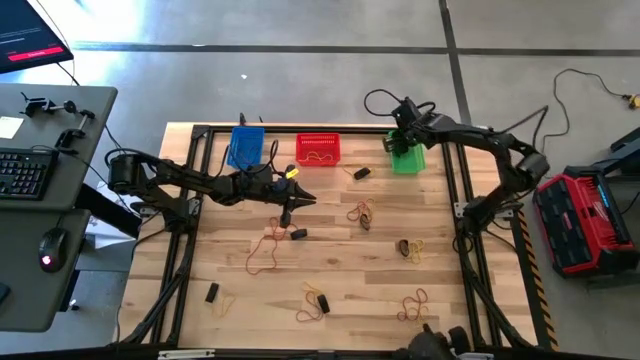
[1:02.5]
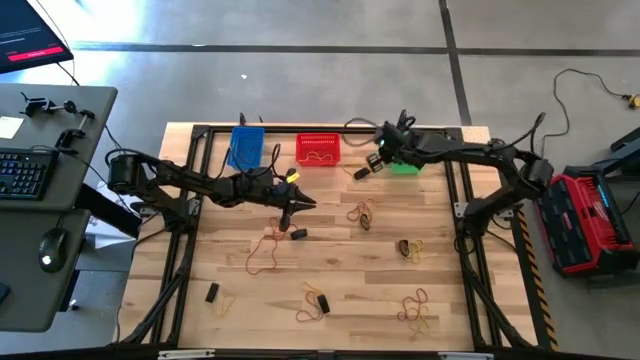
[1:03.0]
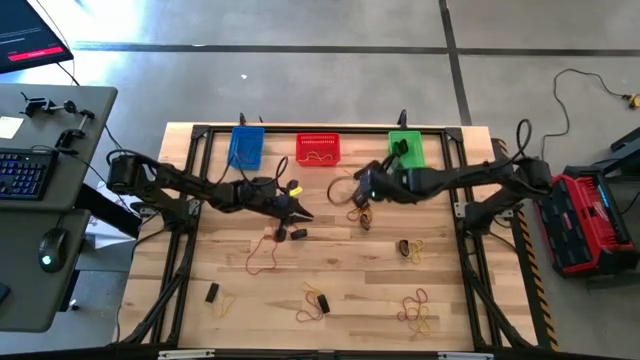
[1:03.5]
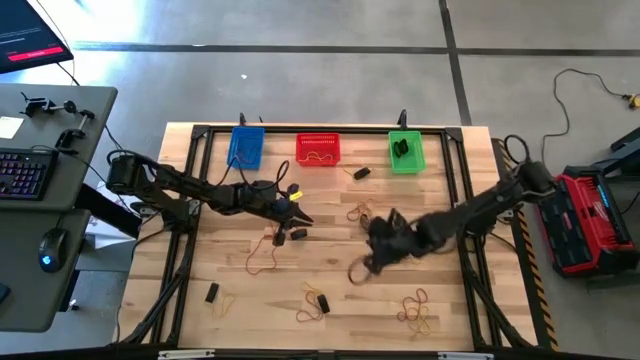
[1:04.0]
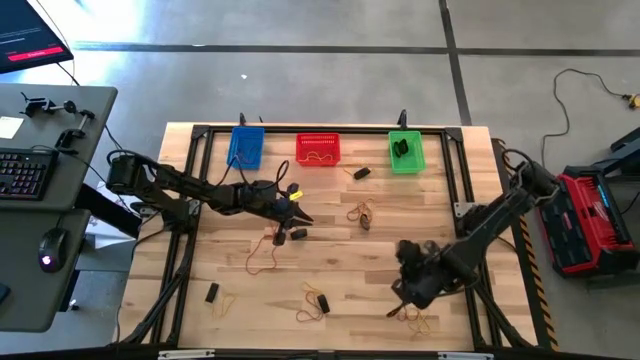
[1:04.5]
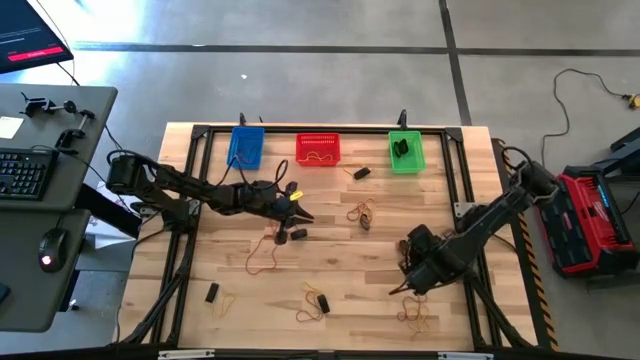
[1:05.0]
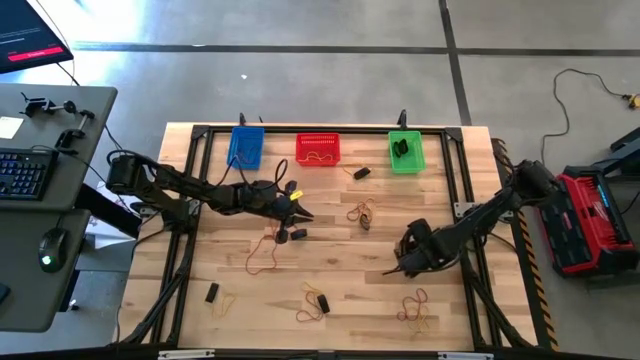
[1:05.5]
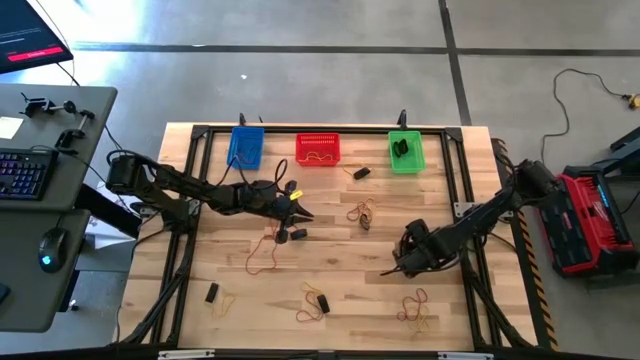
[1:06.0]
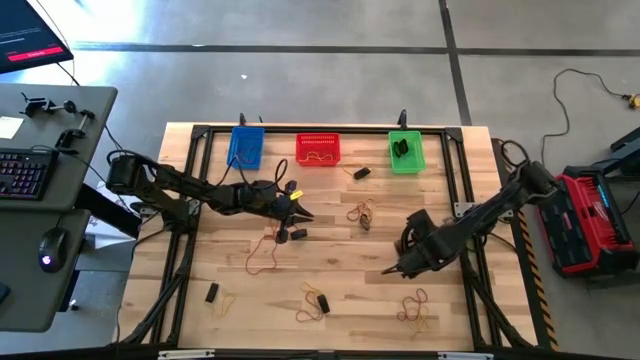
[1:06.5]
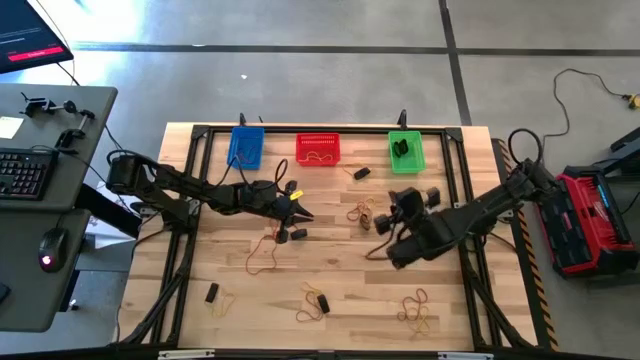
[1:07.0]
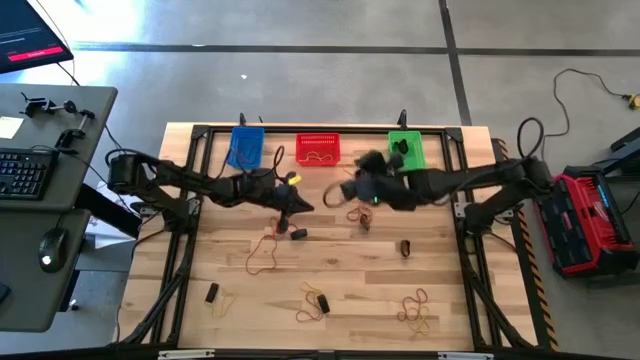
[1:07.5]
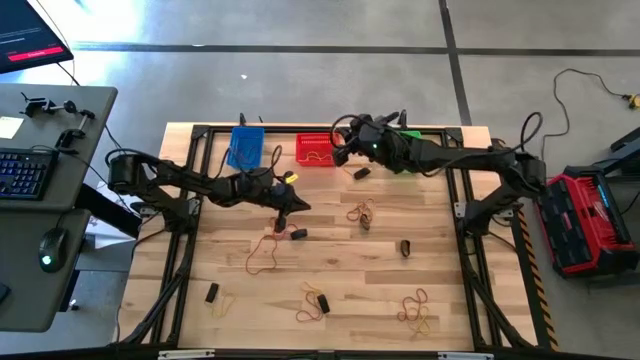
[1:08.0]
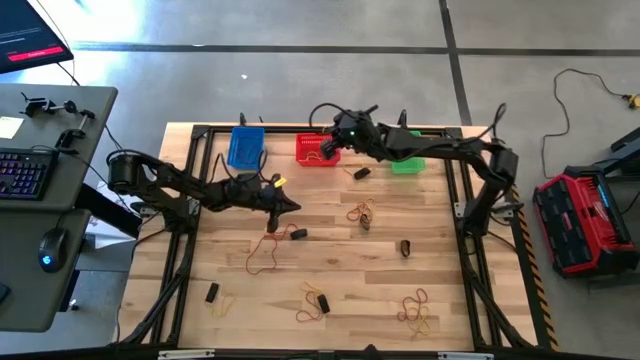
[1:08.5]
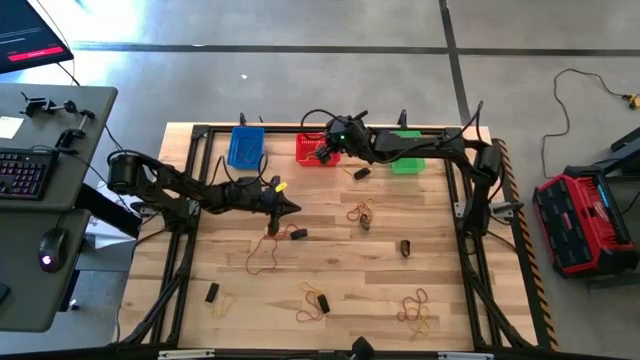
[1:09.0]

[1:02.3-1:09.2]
Task: Sort rubber bands into baskets
Put the yellow rubberband into the orange bin

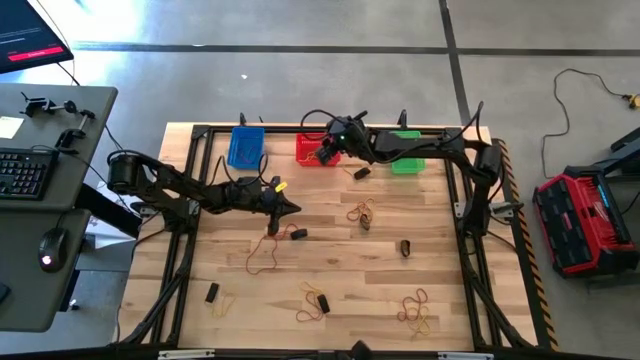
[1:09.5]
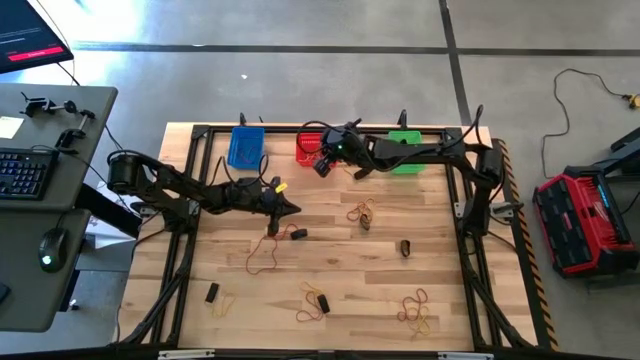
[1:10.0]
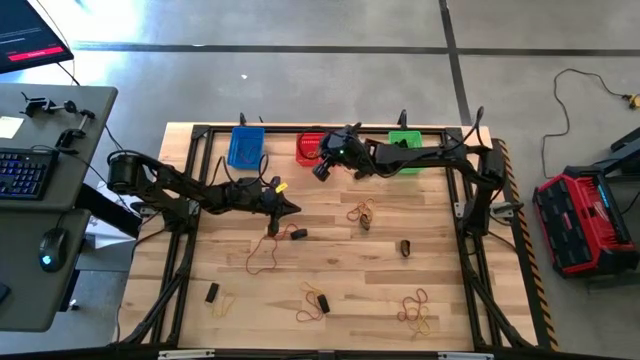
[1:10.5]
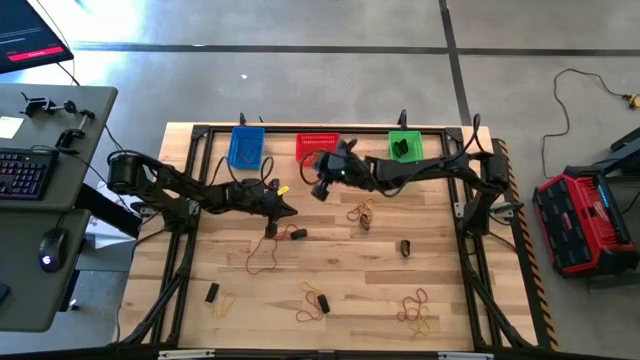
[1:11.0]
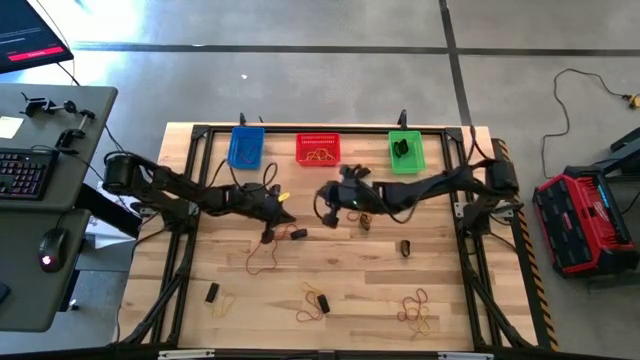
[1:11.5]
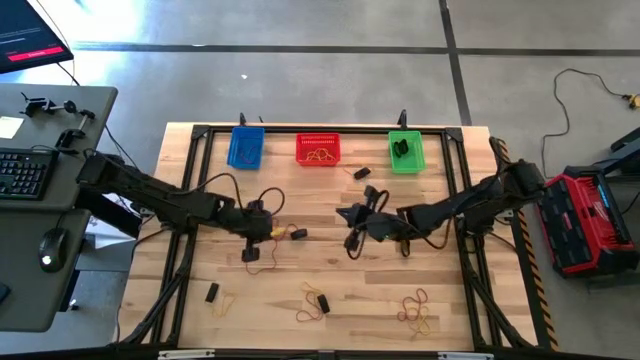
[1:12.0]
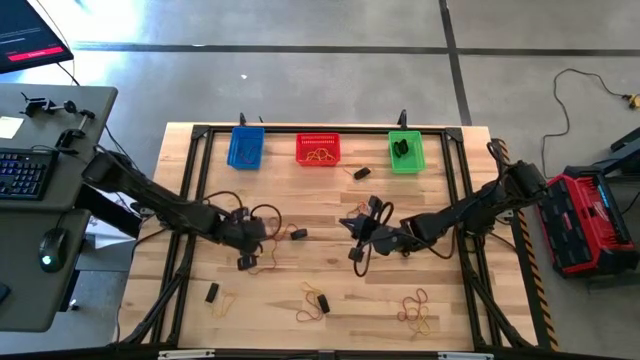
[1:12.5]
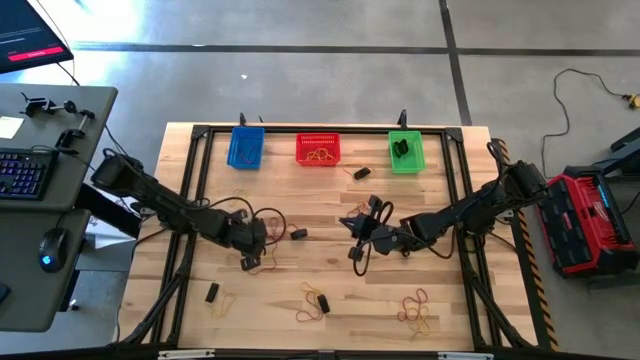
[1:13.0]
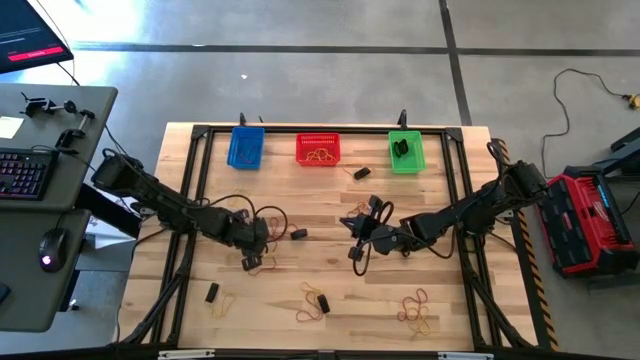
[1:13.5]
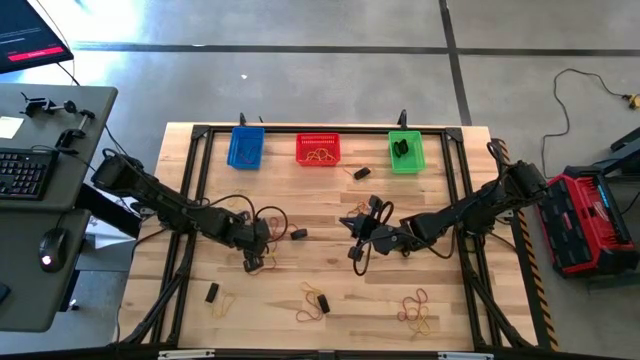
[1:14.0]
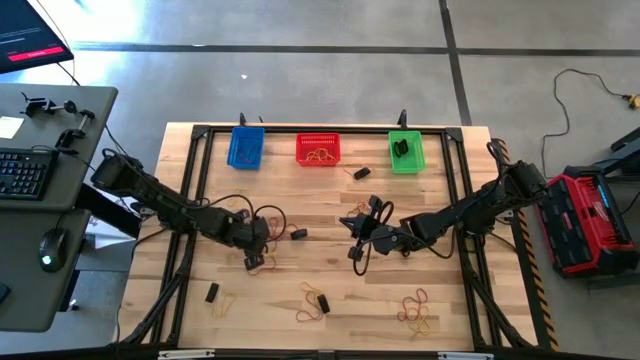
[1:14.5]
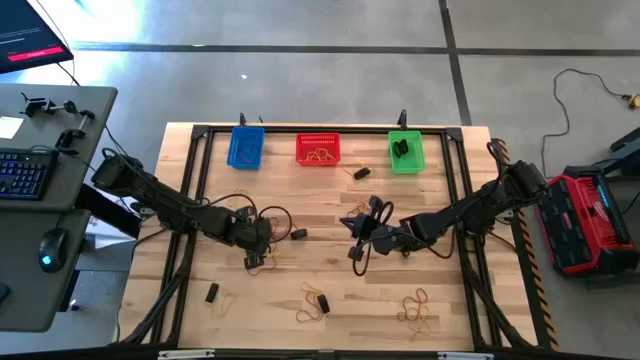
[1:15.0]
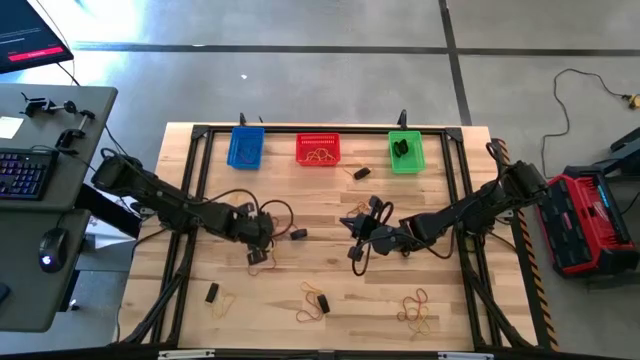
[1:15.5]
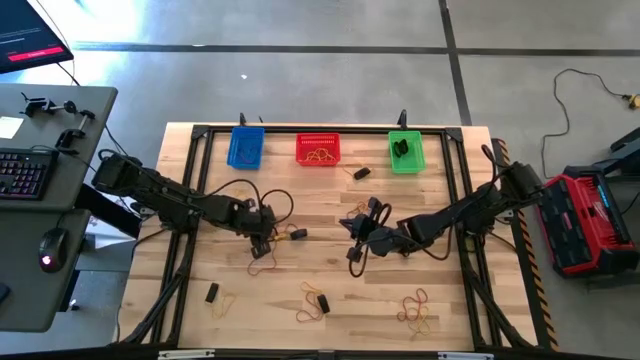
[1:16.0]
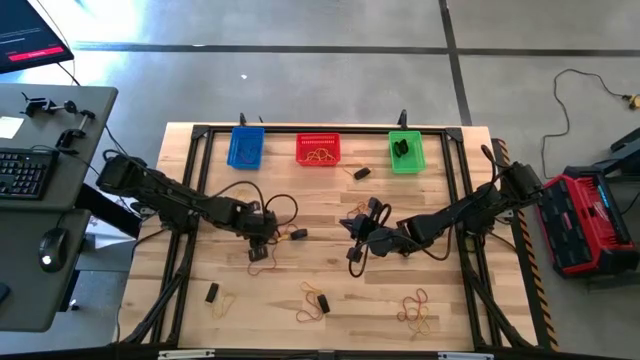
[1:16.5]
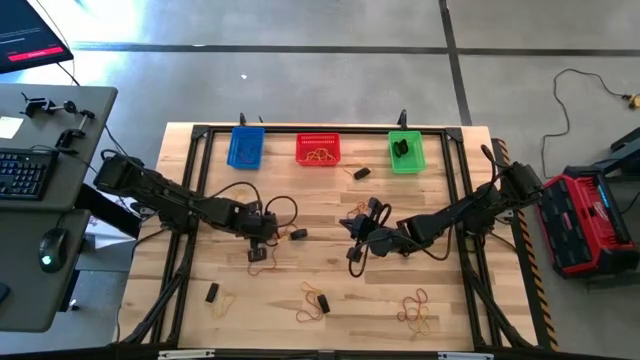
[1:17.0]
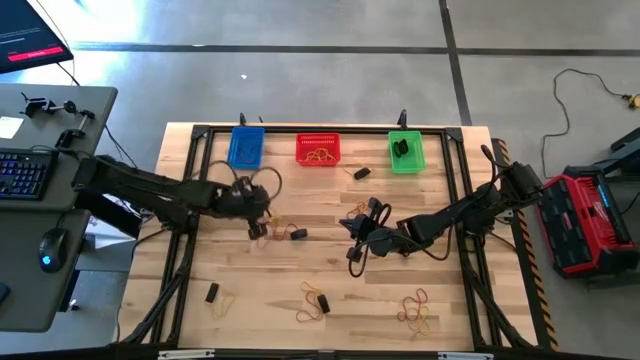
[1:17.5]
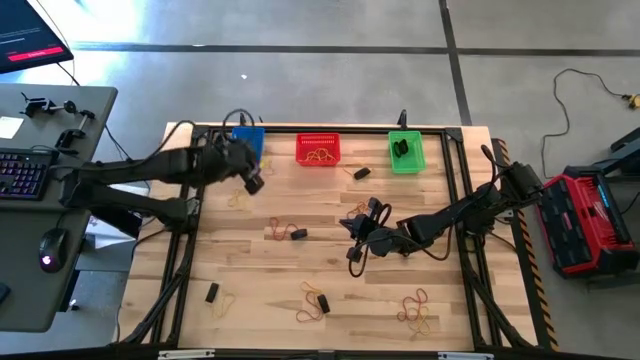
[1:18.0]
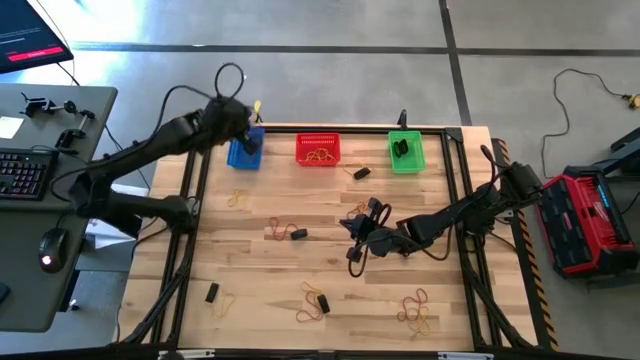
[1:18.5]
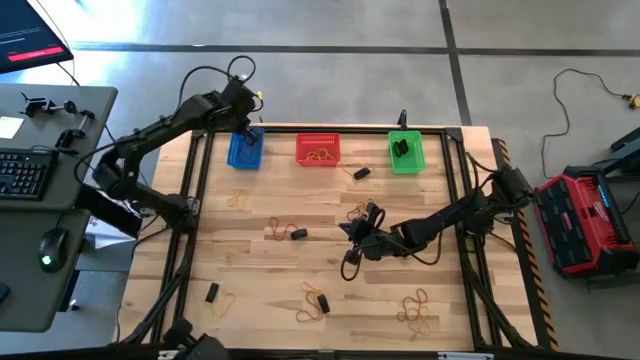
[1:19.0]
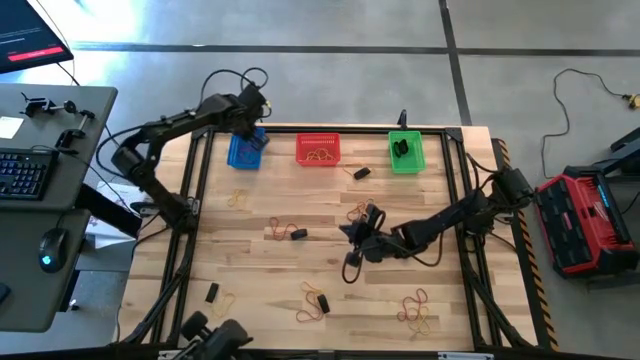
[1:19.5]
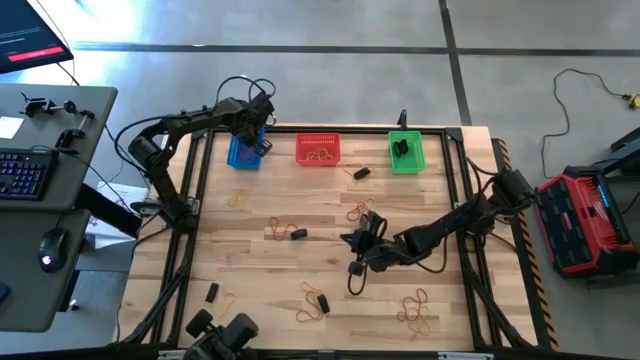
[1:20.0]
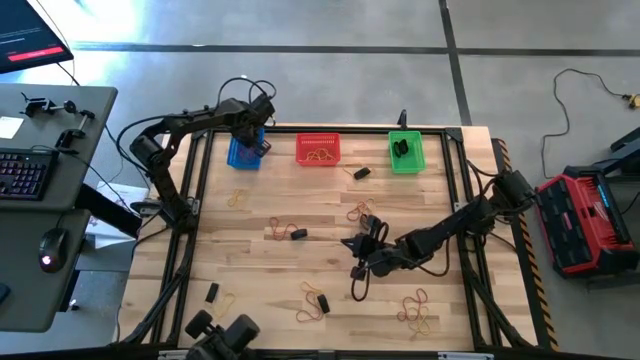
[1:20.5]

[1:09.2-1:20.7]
Put the orange rubberband into the blue bin

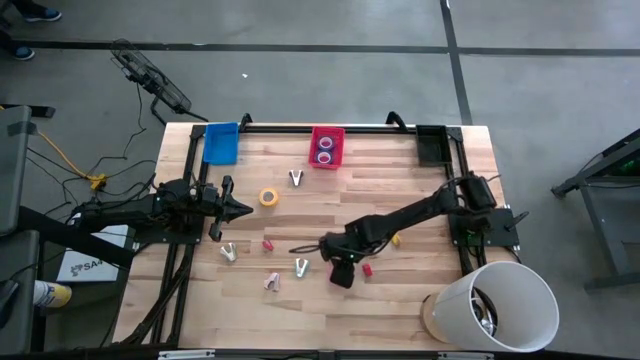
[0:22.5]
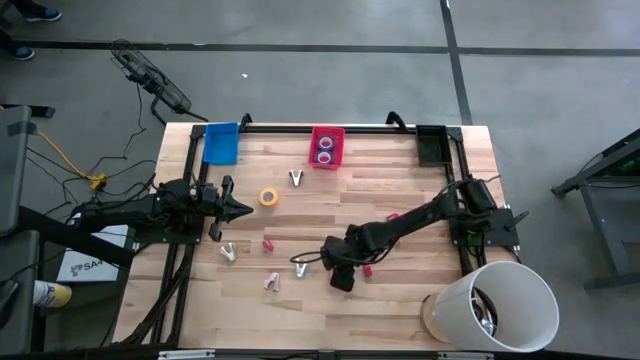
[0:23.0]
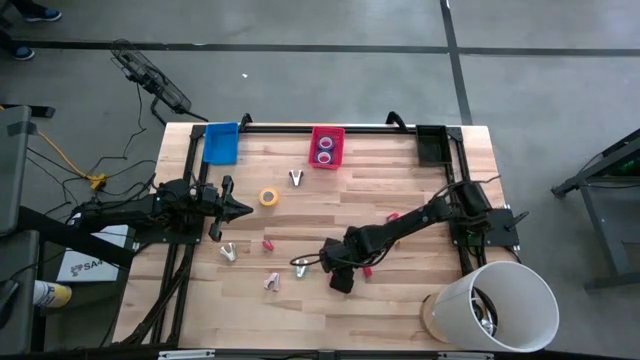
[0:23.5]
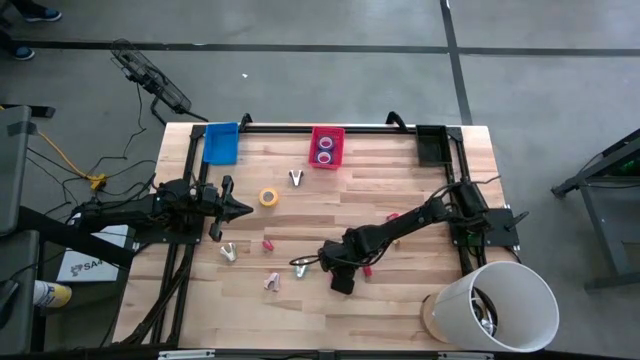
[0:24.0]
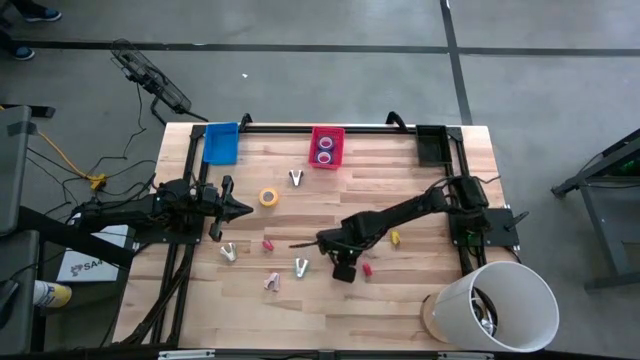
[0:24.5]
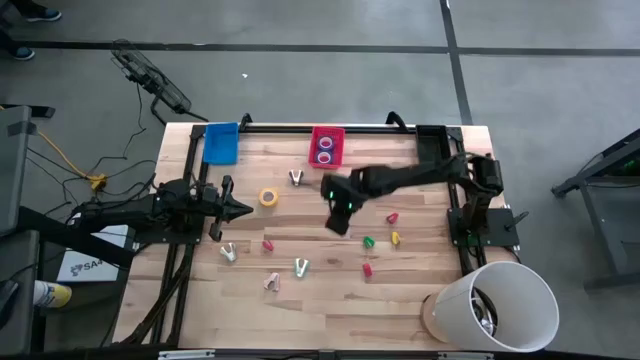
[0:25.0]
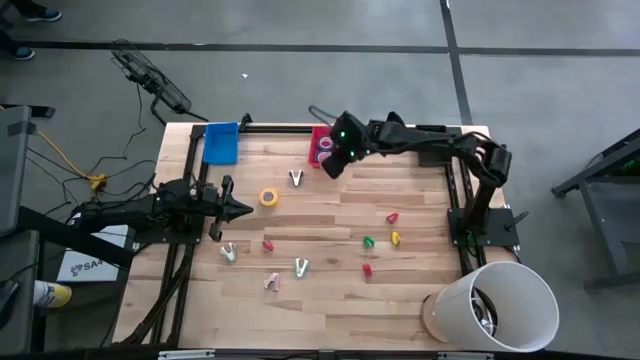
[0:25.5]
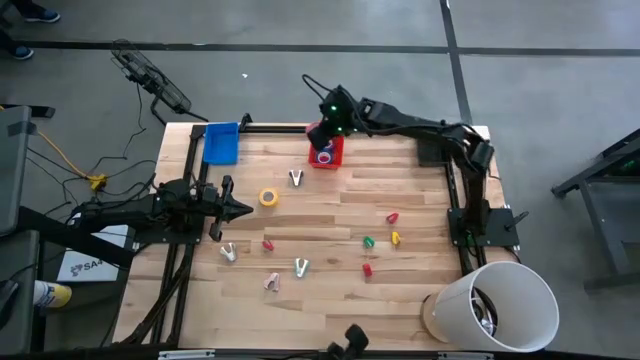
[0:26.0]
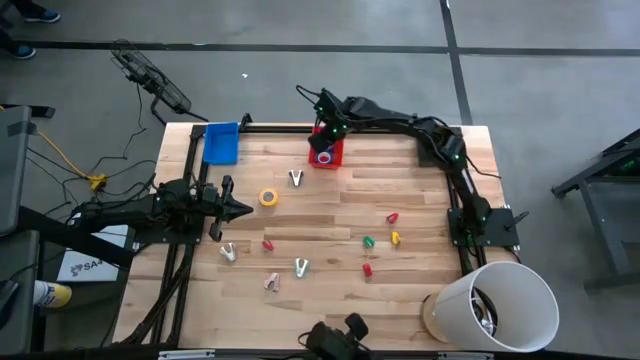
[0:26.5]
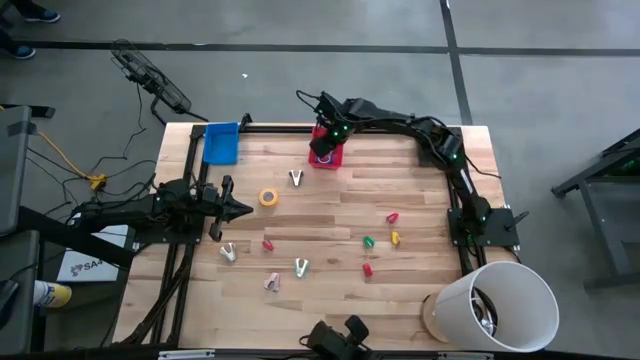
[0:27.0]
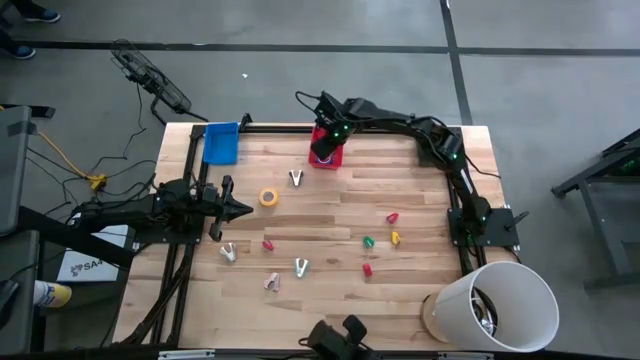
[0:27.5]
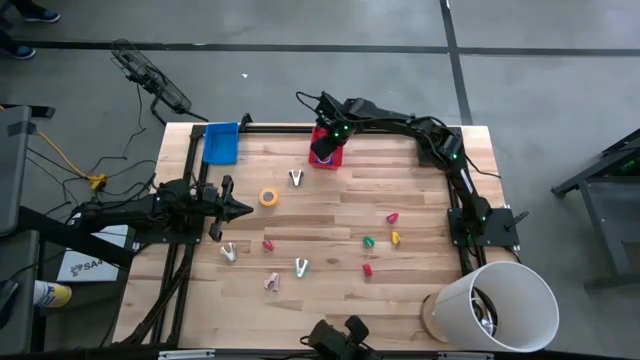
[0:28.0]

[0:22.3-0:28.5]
Task: Pick and place Stapler, Stapler remover, tape
Put the pink tape into the red bin
